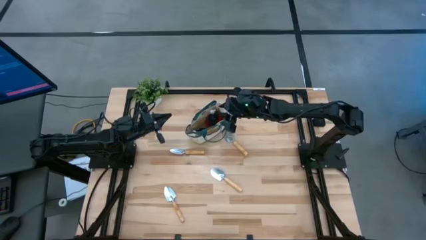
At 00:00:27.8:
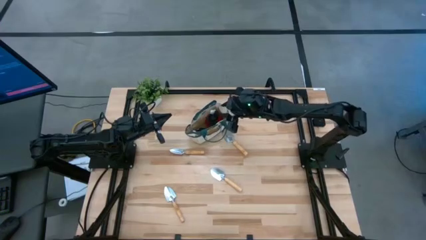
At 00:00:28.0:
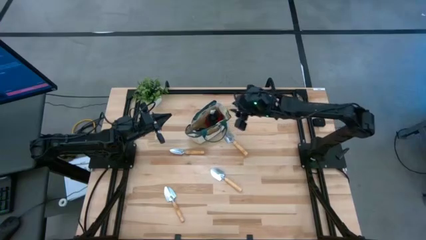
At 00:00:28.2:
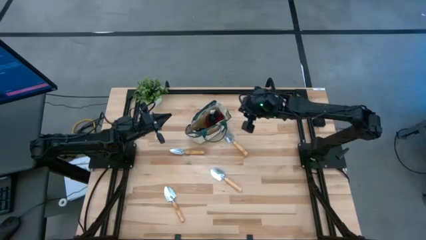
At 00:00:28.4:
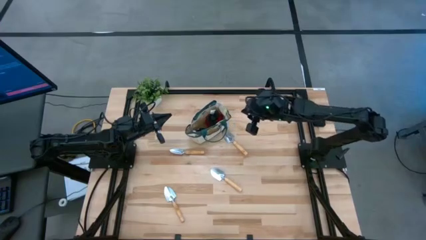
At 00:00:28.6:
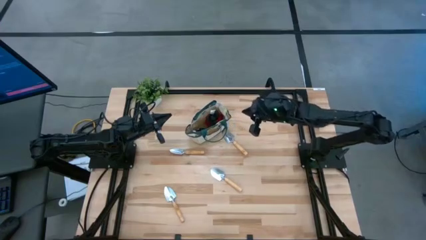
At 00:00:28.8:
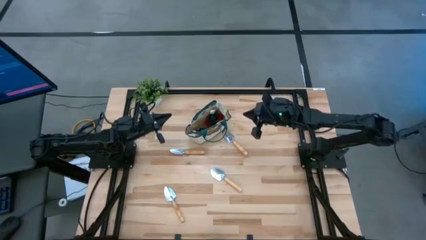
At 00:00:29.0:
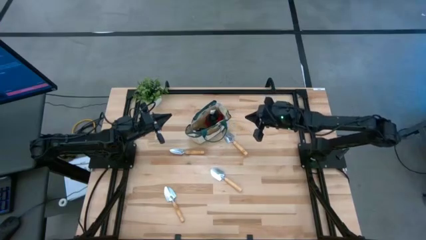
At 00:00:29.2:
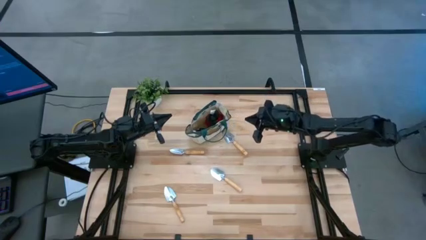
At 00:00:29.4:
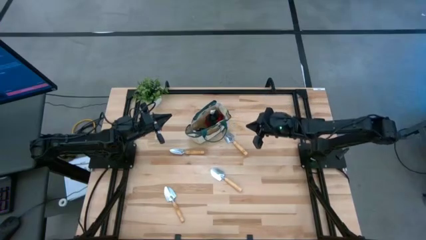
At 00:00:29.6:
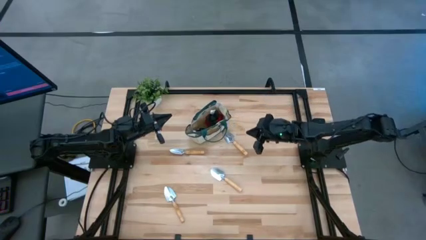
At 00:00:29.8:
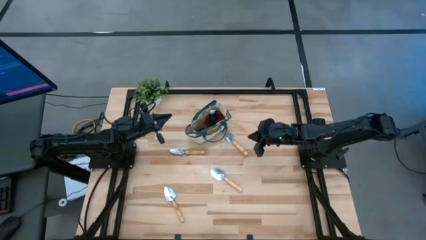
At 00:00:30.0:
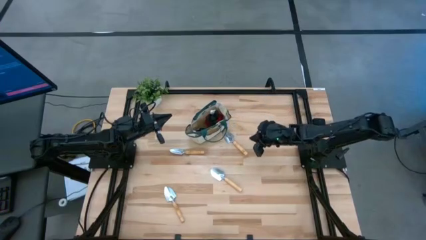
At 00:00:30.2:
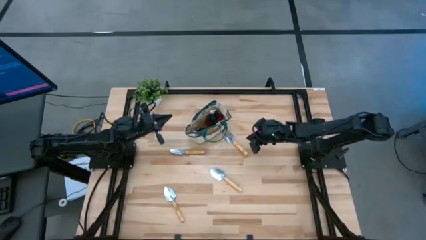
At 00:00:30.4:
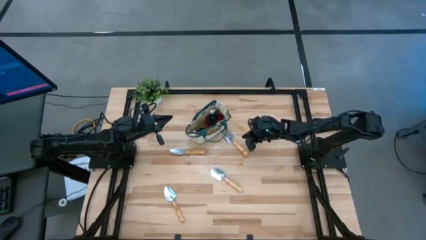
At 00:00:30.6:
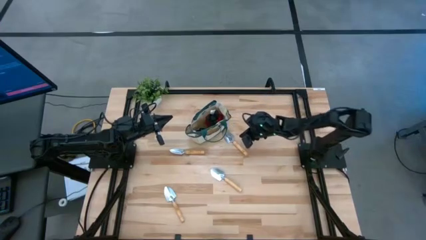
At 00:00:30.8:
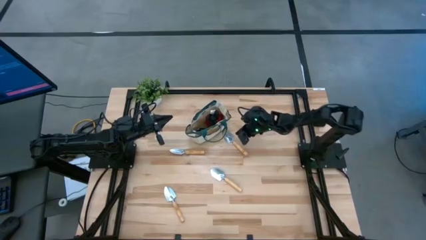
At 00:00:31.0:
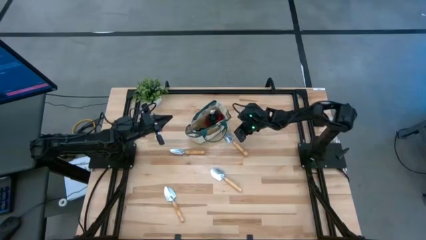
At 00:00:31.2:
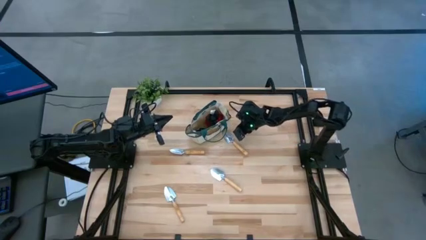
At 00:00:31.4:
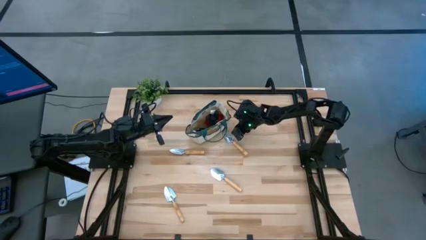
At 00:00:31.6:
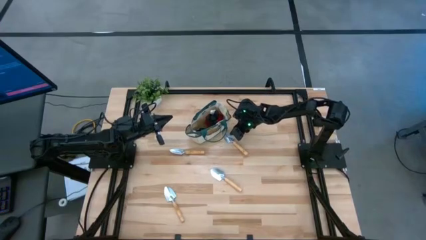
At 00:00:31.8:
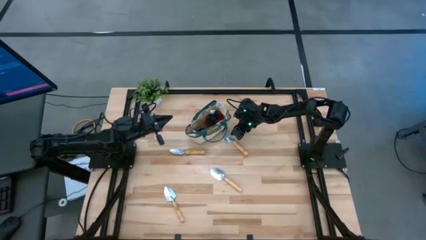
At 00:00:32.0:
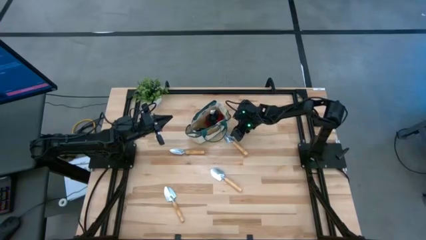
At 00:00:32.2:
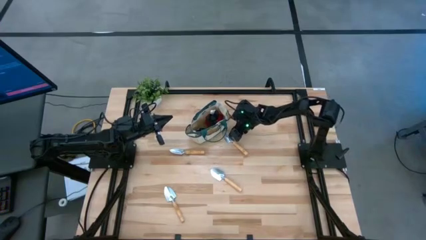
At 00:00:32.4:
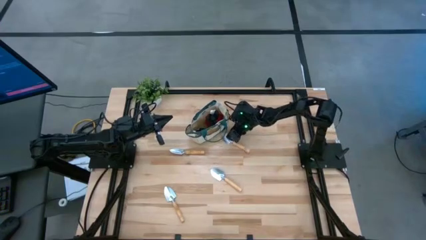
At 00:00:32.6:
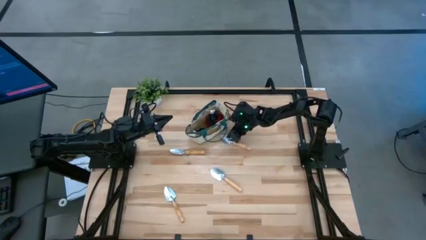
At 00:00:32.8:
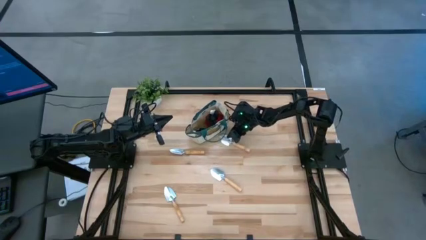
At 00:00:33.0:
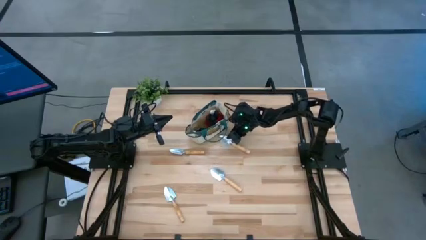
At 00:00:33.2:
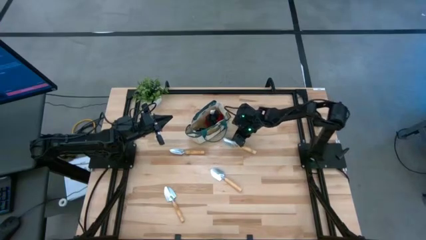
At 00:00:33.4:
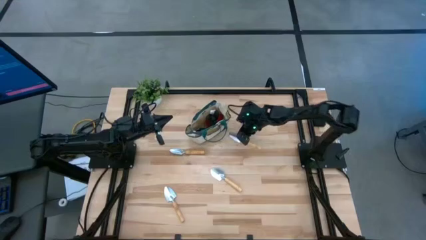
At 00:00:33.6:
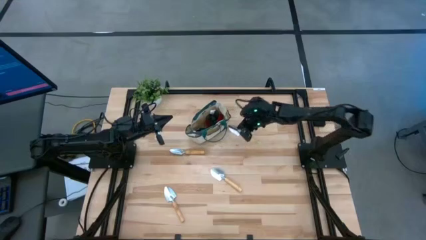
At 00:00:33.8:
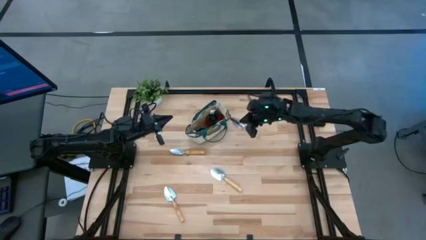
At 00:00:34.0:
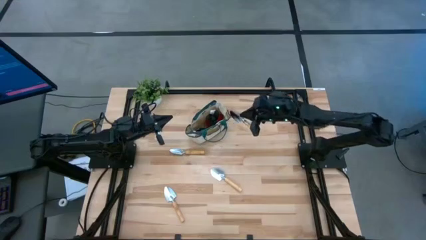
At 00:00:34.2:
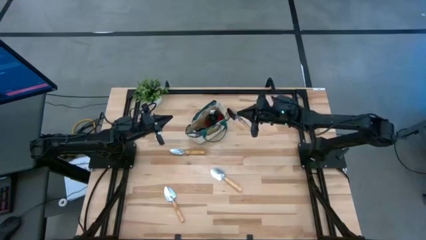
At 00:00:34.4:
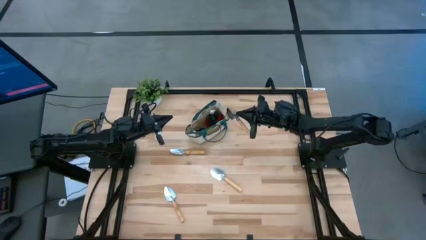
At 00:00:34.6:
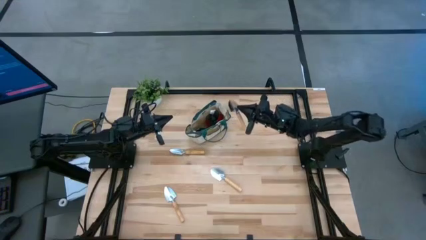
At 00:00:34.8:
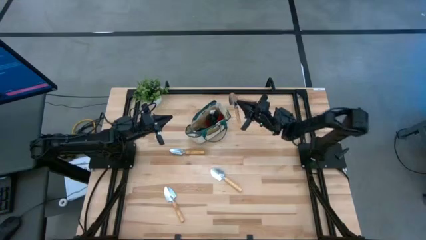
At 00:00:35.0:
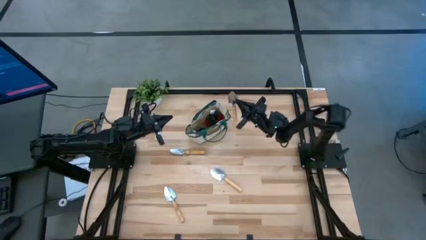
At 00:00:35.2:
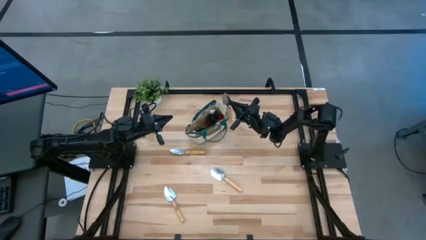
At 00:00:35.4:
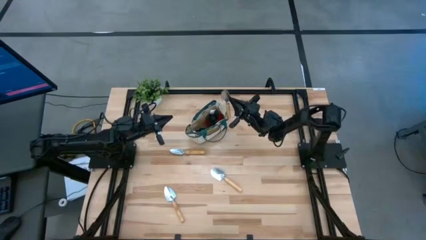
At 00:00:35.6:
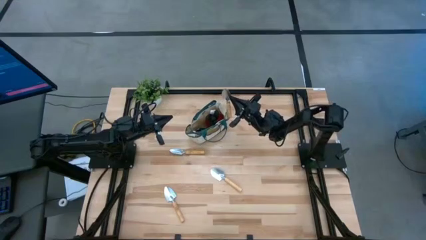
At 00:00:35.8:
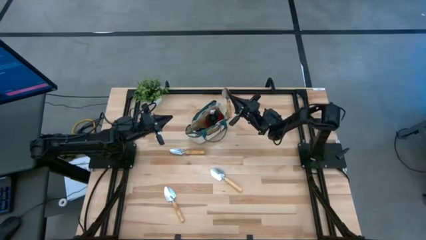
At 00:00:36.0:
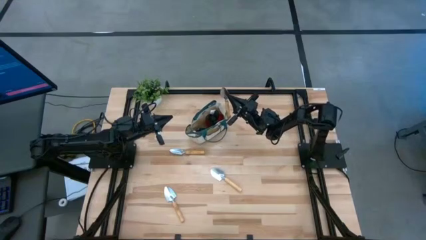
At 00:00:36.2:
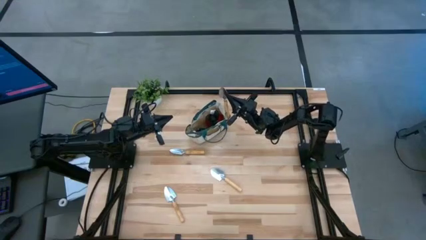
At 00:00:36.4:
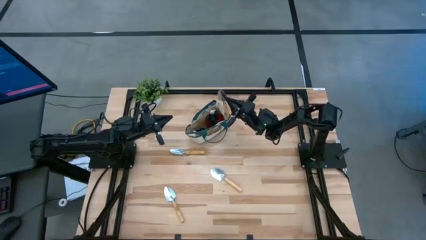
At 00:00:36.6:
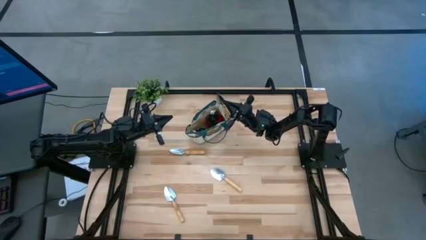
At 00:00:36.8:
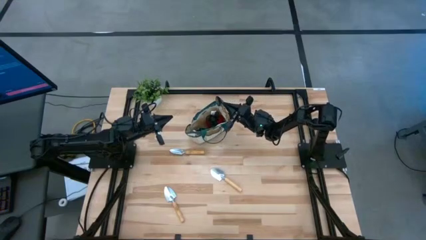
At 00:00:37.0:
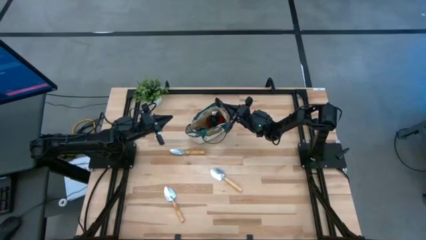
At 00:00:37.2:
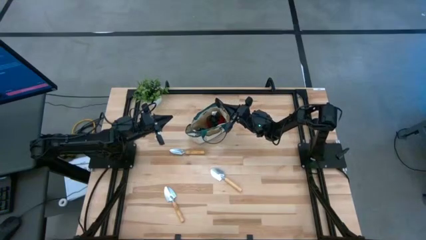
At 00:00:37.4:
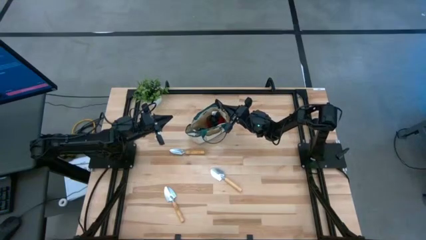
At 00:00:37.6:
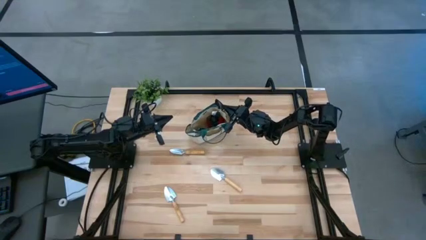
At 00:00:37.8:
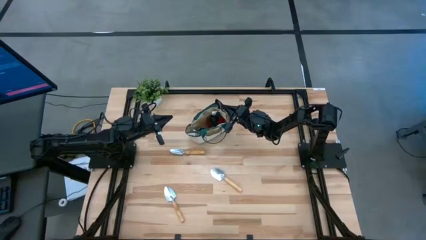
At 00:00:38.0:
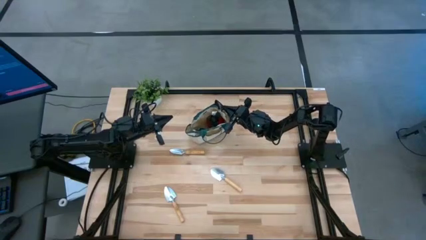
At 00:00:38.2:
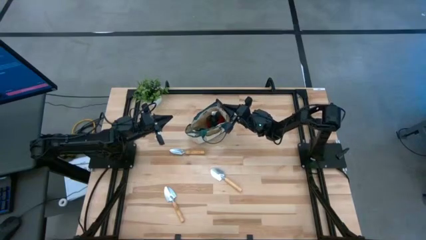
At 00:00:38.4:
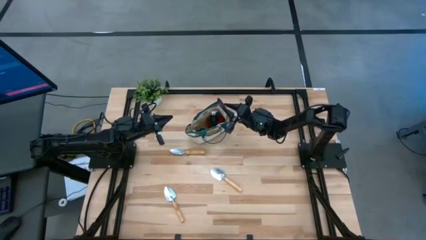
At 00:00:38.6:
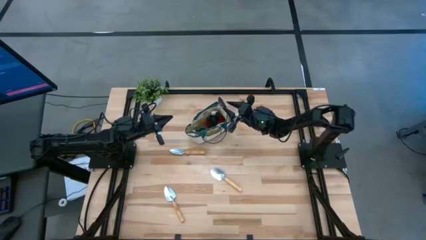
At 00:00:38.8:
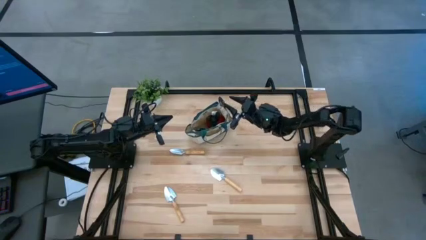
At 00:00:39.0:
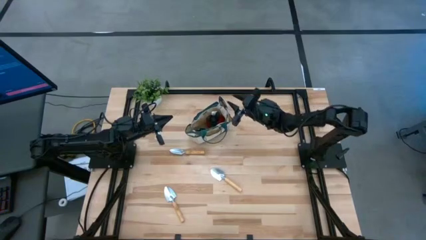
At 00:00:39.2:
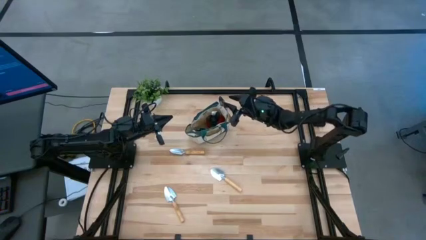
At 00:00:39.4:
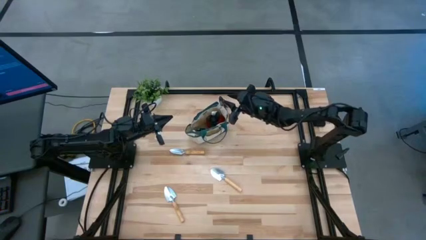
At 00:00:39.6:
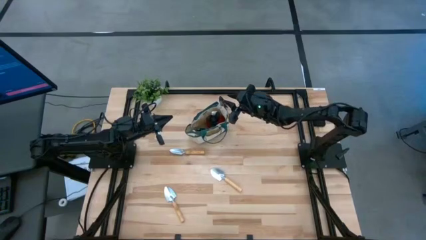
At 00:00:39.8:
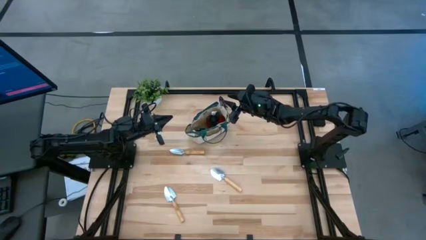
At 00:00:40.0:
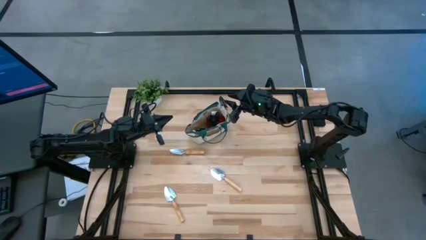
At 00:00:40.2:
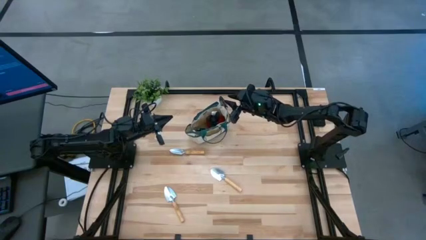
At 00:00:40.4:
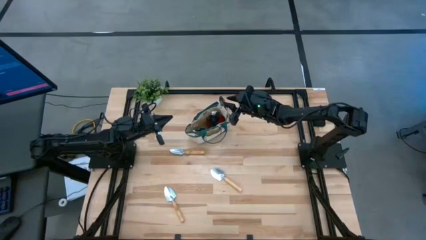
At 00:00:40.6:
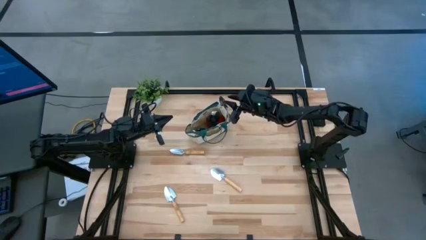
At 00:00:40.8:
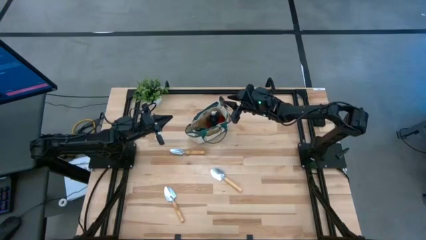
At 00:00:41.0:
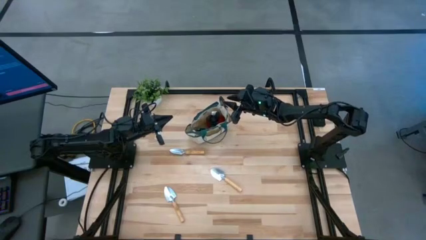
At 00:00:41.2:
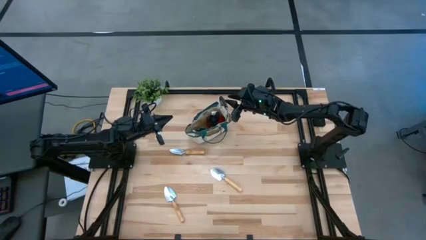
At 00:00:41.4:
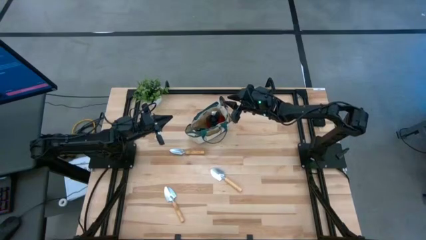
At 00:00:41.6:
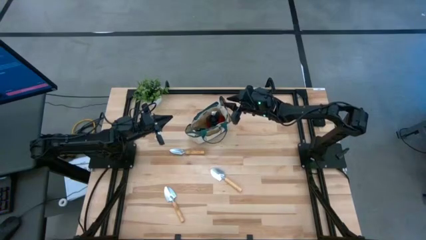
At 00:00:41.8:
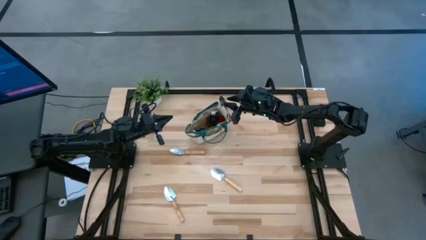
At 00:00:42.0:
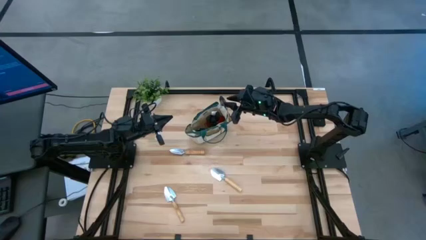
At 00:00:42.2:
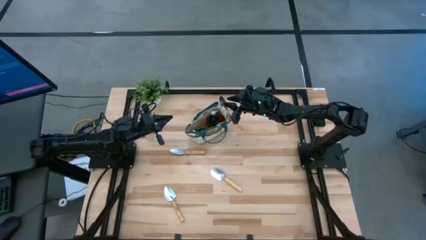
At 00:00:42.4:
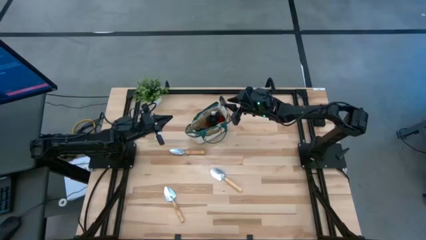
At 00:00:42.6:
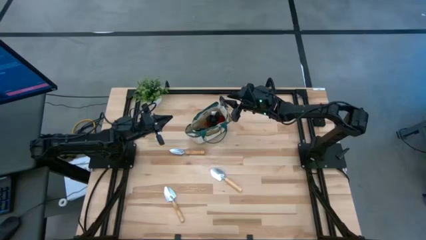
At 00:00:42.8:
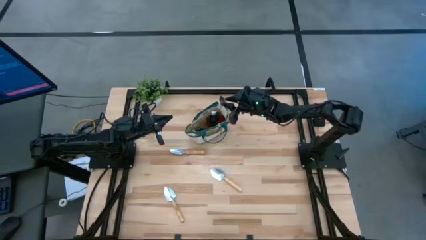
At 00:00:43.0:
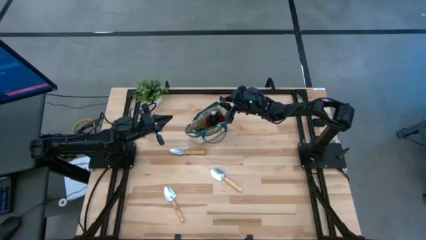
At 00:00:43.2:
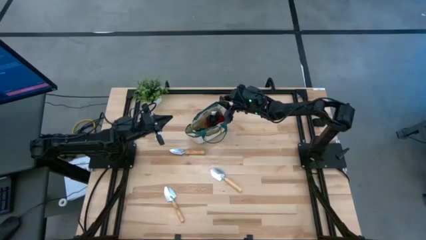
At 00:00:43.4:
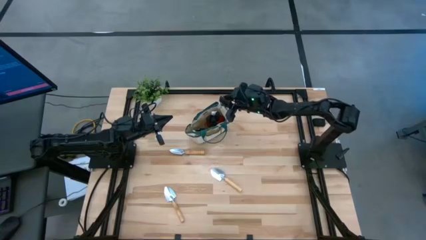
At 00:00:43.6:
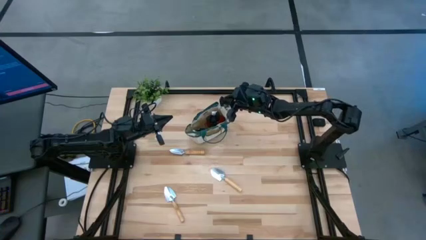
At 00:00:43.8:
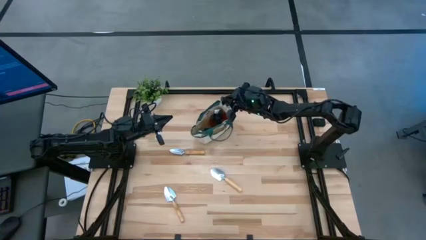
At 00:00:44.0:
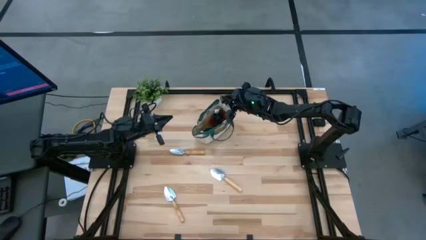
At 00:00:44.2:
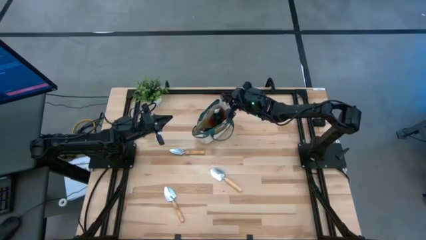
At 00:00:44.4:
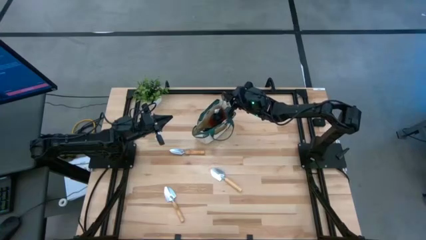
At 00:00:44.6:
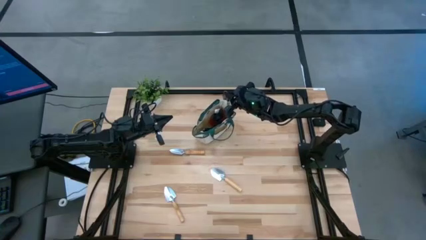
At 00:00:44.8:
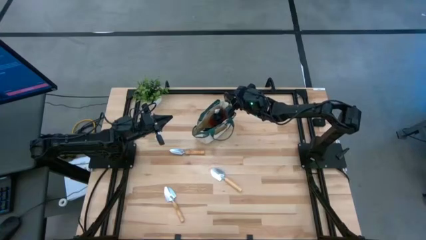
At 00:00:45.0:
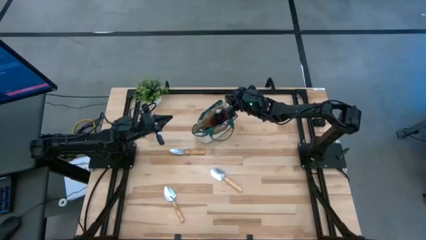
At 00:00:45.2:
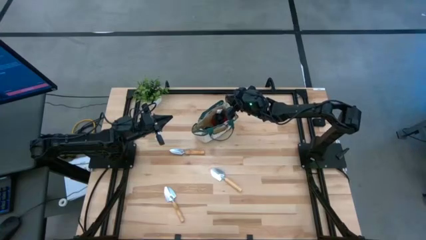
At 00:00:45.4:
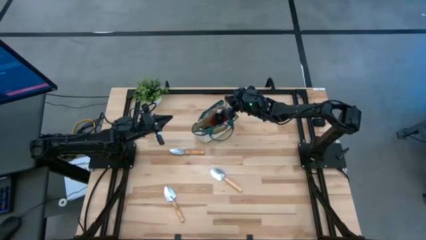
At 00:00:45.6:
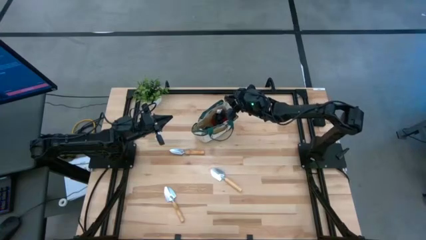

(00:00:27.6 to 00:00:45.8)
Task: Pick & Place Garden tools in Gardening bag
Put the trowel into the gardening bag
